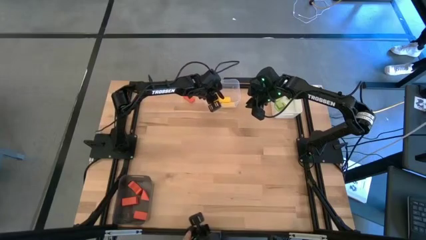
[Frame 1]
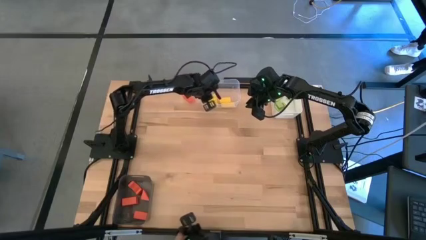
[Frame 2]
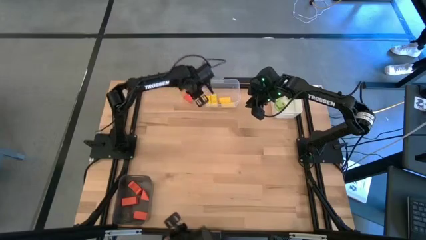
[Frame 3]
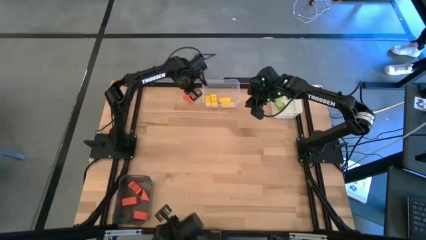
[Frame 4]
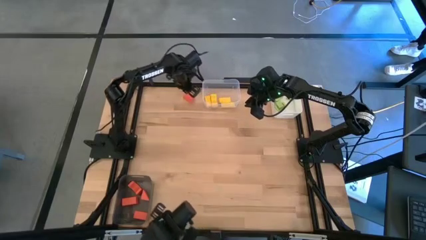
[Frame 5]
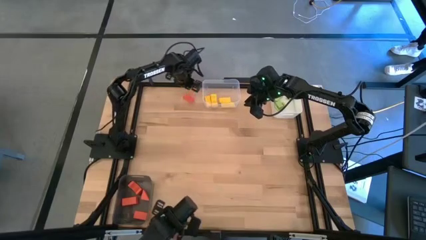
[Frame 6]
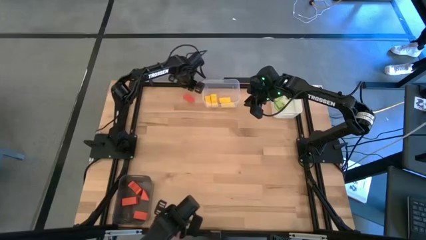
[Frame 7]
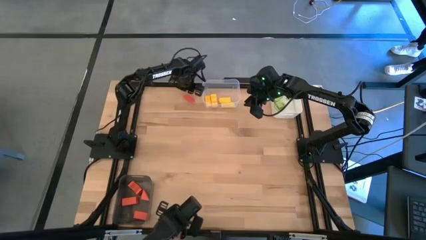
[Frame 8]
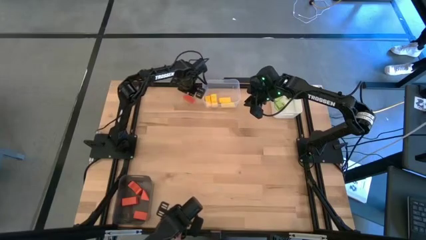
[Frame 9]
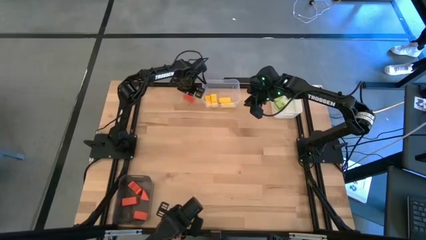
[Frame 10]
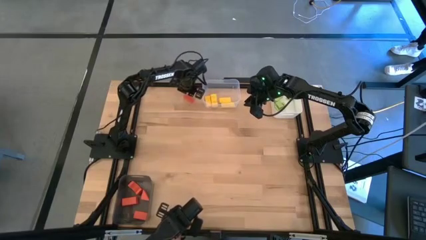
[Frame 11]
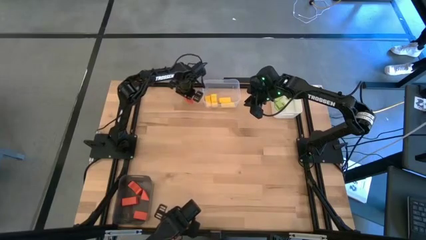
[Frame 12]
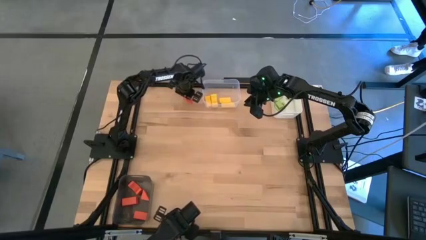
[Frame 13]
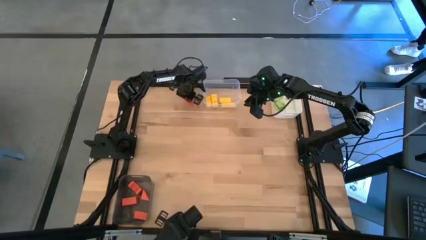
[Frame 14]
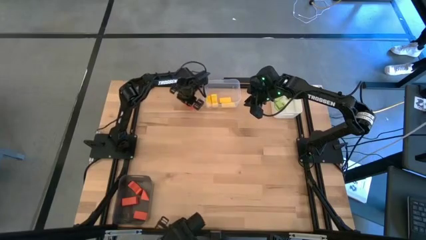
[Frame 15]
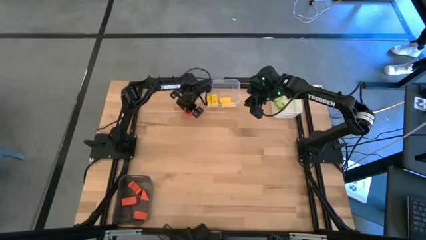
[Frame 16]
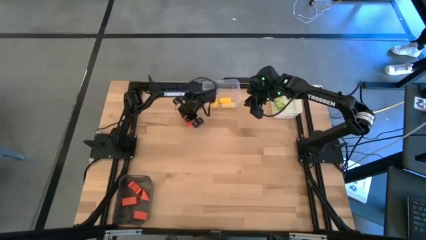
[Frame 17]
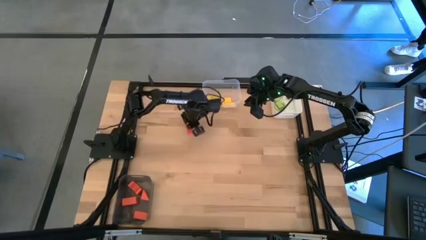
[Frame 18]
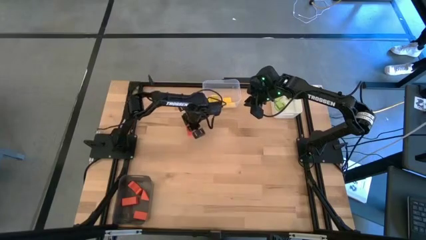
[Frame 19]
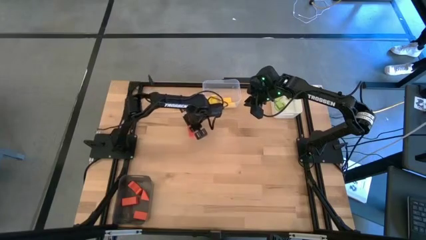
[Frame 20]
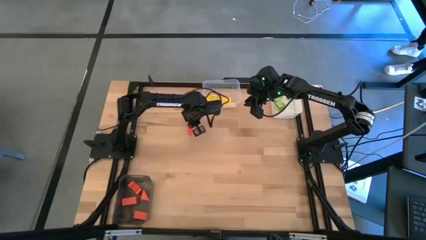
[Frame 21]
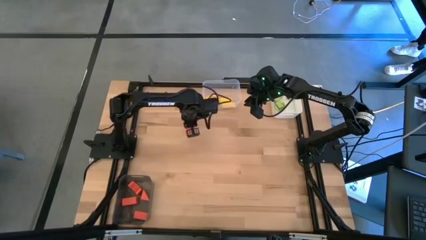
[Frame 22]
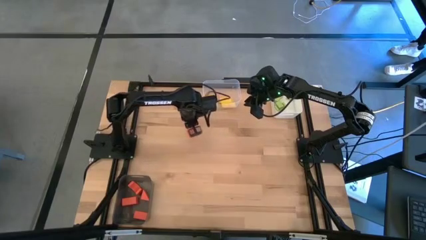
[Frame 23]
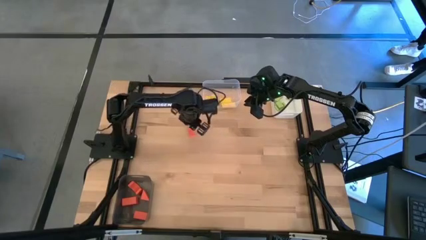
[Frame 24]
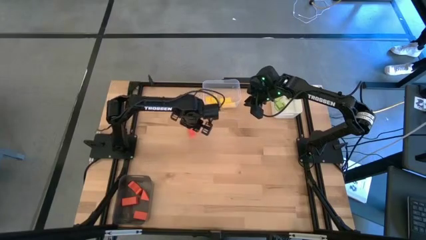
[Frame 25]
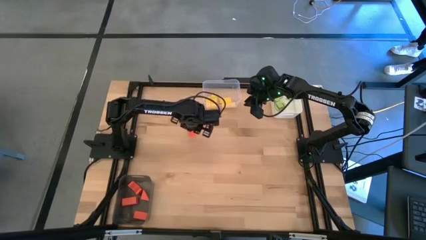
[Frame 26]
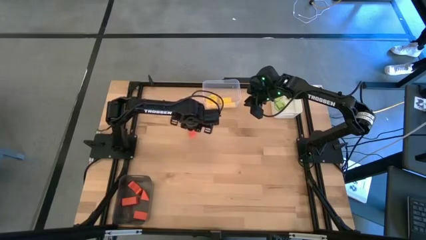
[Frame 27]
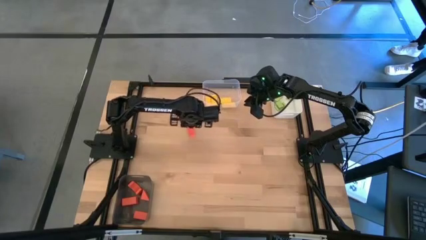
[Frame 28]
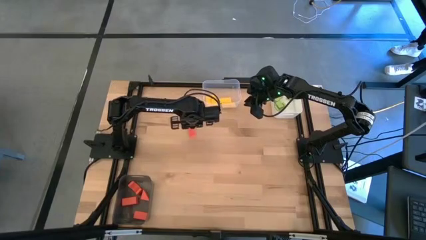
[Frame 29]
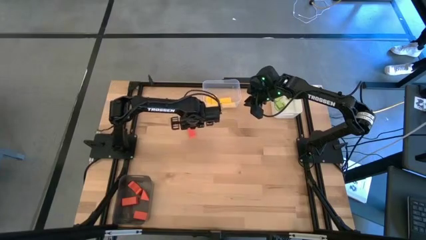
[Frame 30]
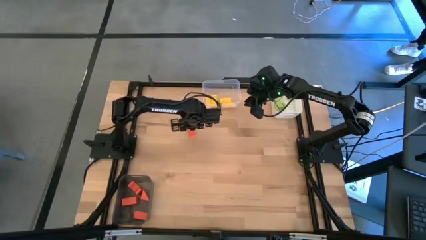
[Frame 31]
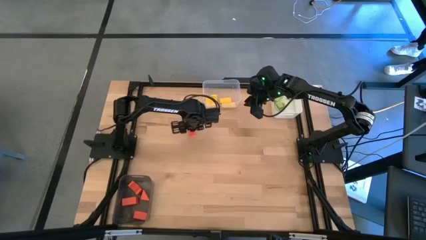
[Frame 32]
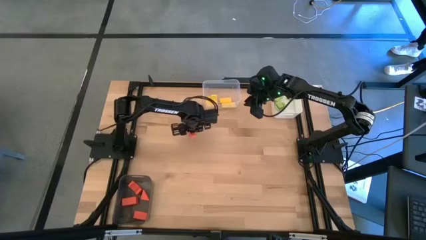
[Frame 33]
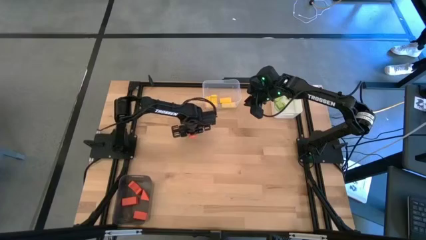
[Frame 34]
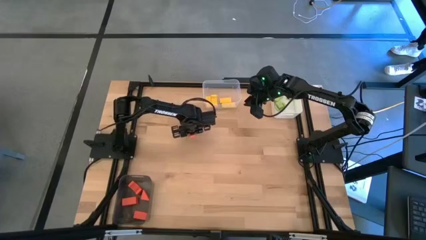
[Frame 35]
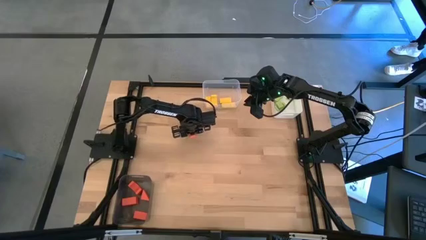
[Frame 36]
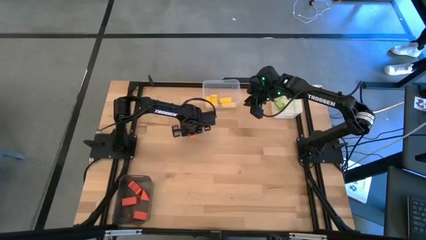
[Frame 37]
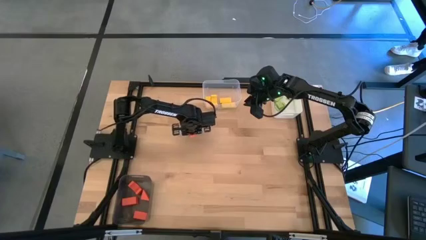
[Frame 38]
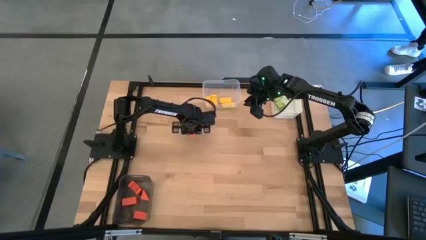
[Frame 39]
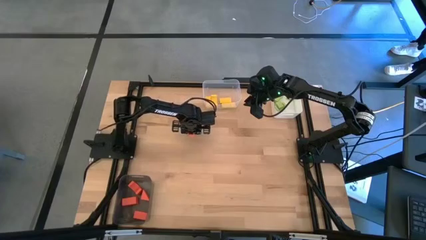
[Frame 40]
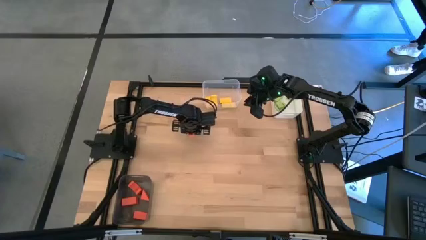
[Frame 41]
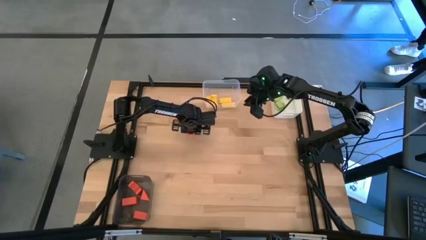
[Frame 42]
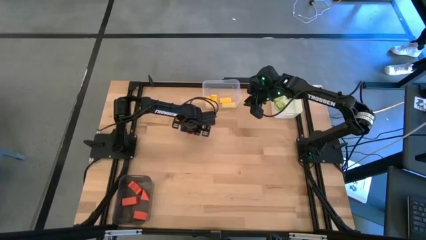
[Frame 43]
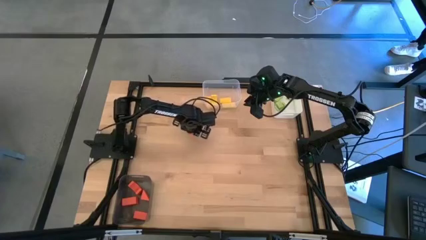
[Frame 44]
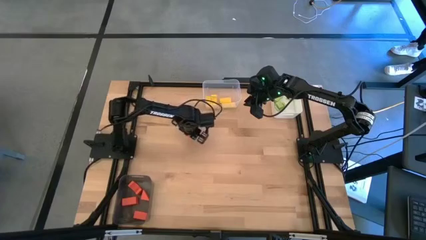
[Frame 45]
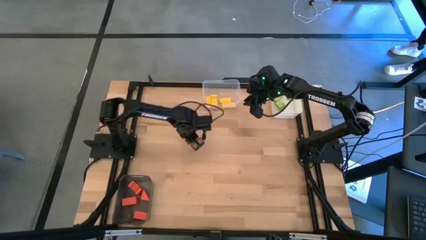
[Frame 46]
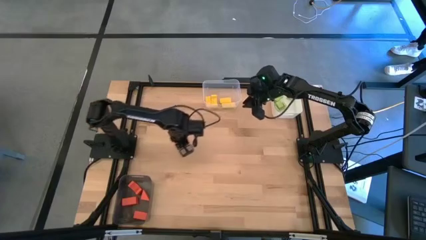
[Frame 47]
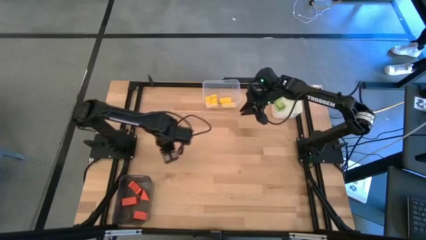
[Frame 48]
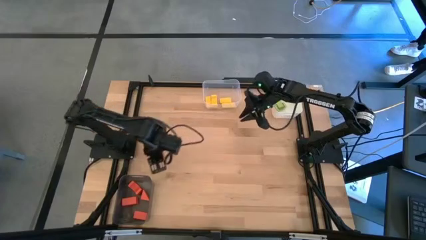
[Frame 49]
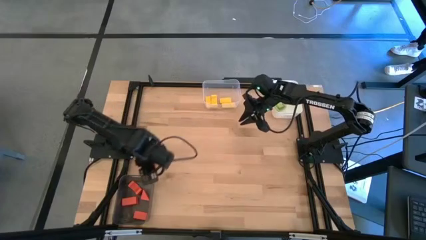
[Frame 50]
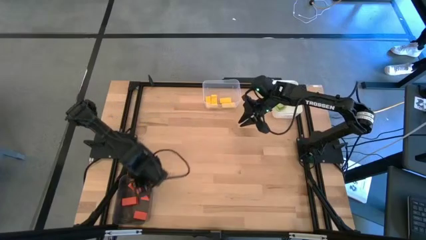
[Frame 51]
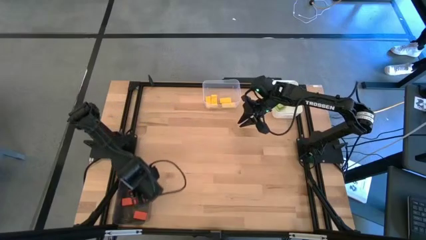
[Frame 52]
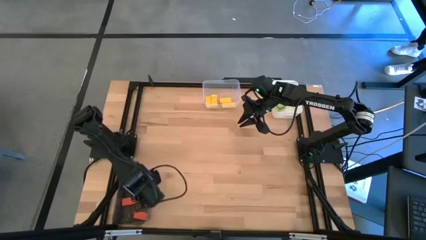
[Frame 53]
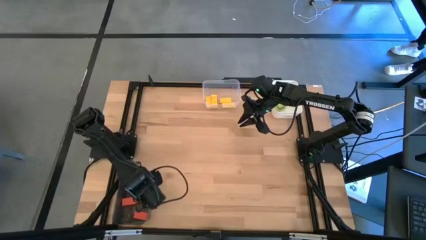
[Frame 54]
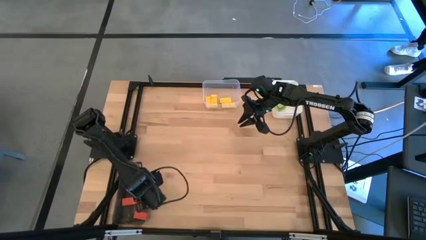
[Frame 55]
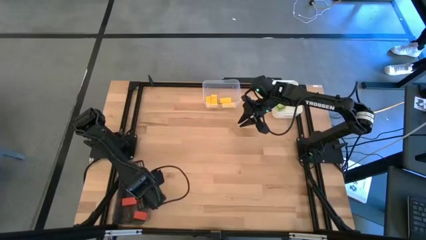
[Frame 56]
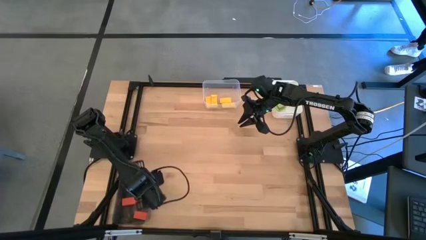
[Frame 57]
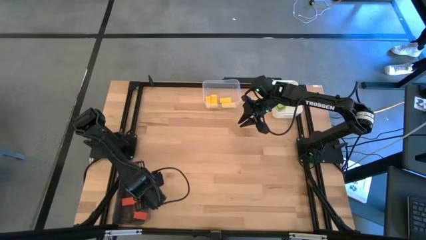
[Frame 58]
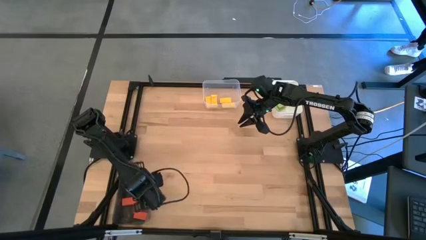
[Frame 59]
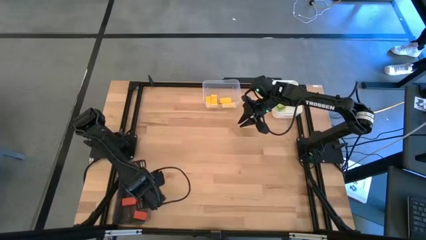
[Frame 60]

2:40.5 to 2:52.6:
Task: Sort & place blocks by color
Put the orange rectangular block into the black bin

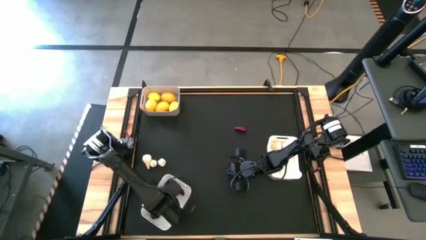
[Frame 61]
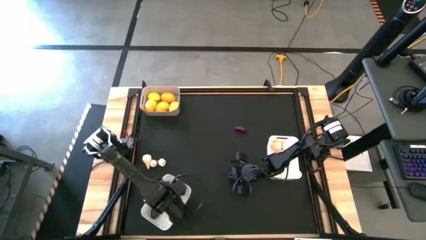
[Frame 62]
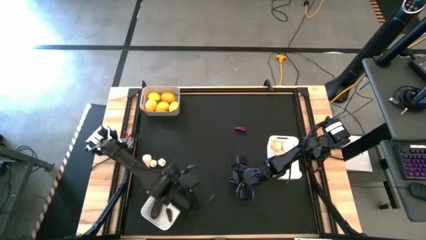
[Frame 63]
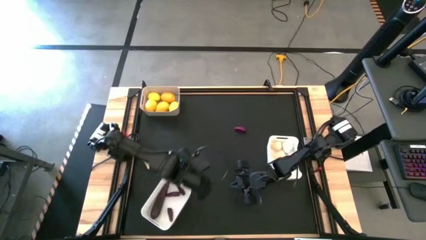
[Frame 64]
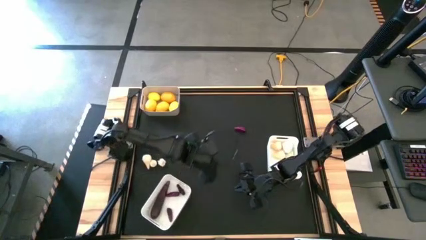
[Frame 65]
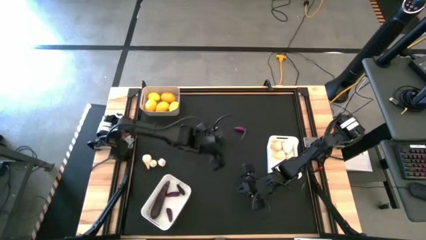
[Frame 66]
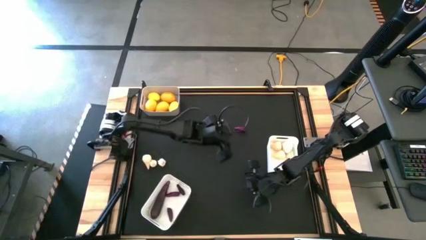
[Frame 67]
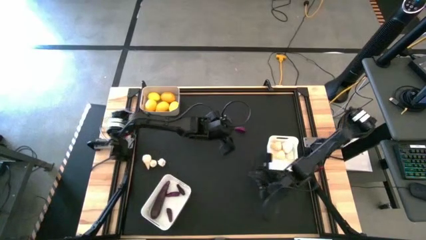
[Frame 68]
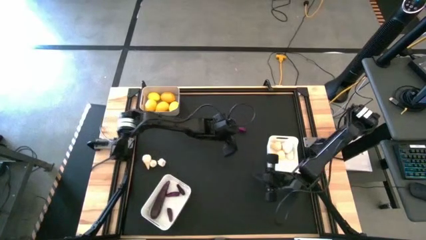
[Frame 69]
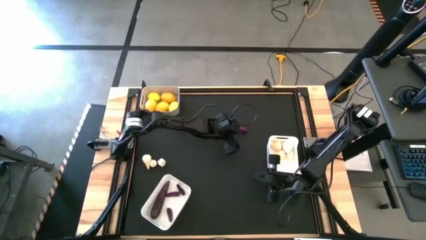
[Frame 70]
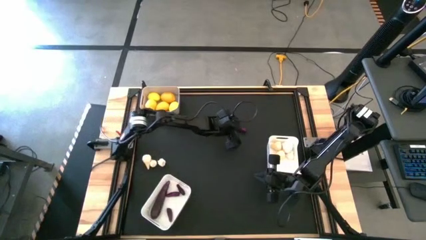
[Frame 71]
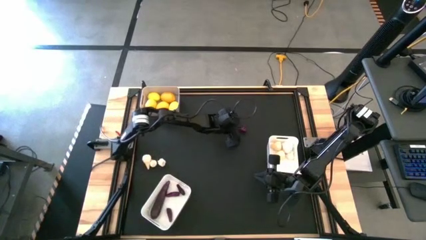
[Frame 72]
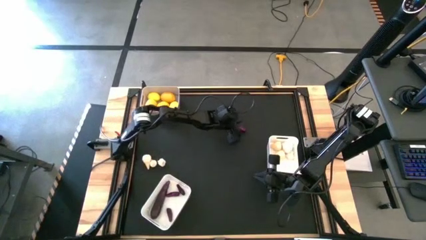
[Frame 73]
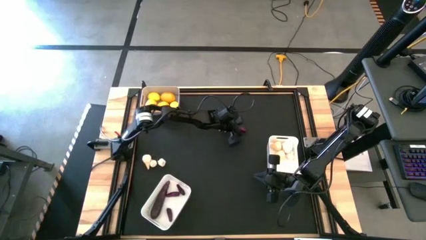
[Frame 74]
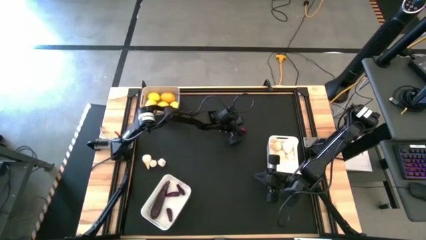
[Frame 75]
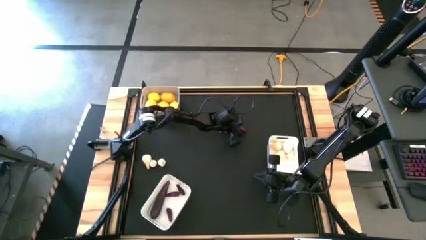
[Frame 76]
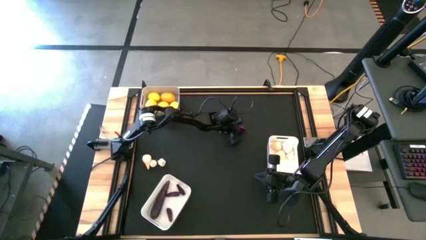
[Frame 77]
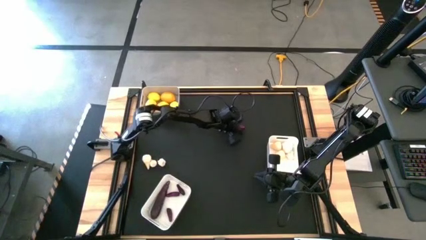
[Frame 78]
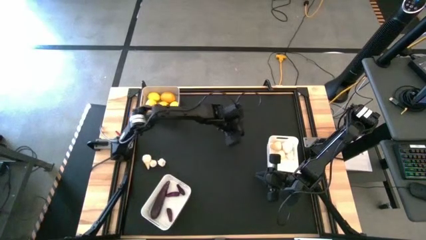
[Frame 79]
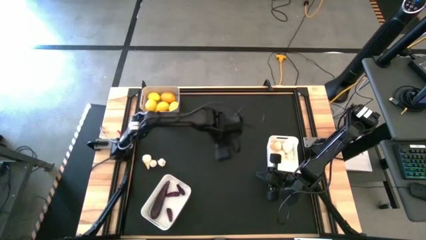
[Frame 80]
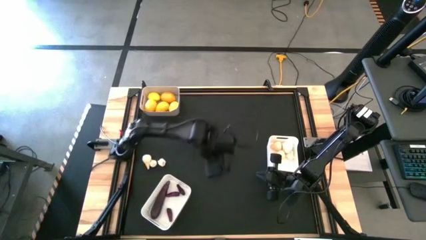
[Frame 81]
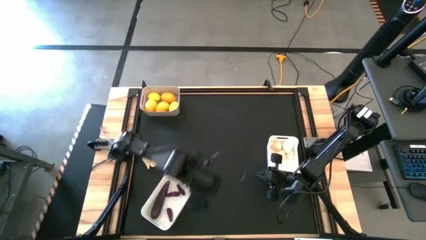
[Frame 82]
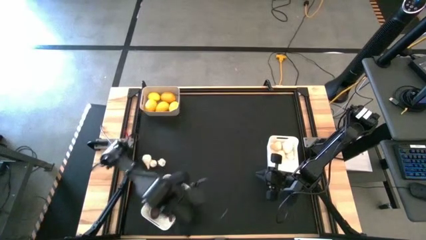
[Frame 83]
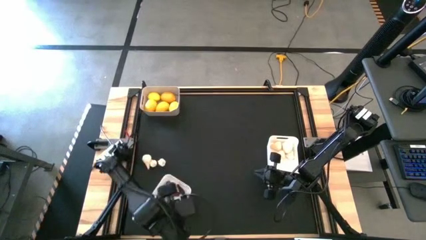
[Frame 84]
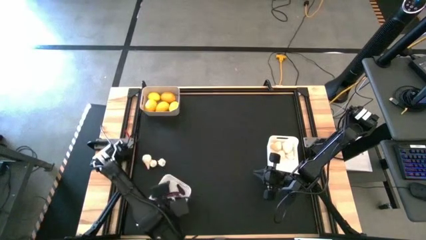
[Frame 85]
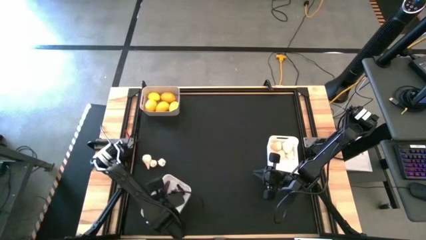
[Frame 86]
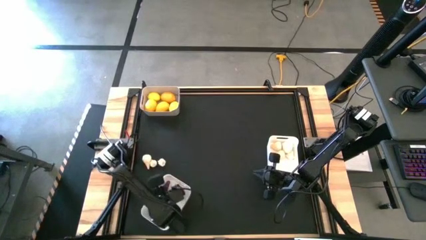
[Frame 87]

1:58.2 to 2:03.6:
Task: Sort produce into baskets
Put the eggplant into the bottom left white bin
